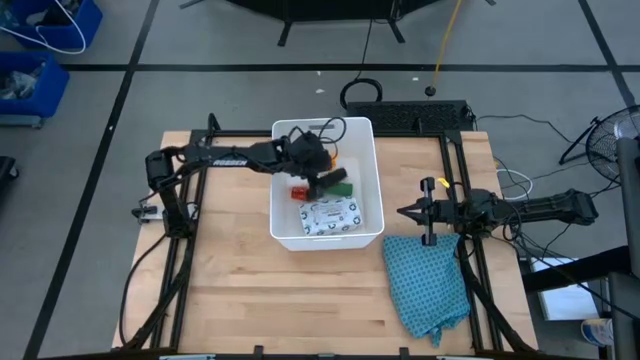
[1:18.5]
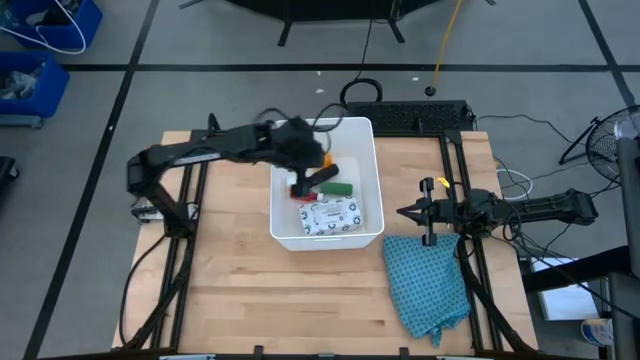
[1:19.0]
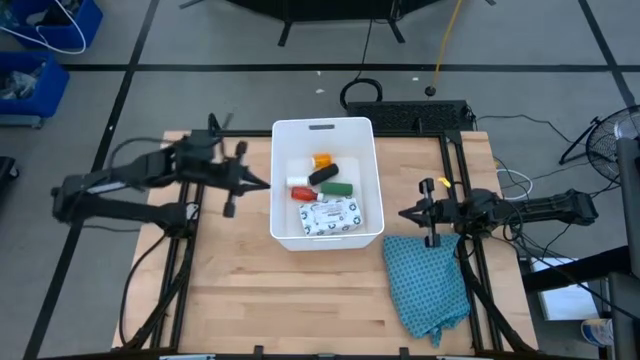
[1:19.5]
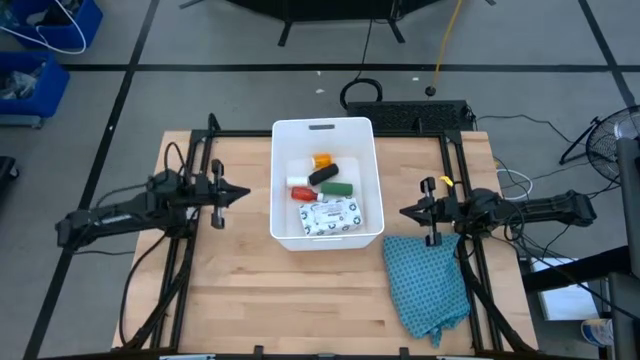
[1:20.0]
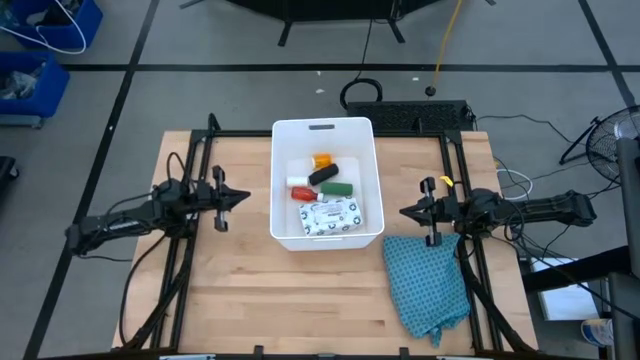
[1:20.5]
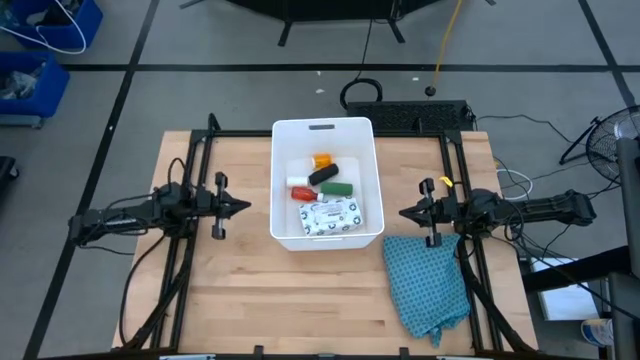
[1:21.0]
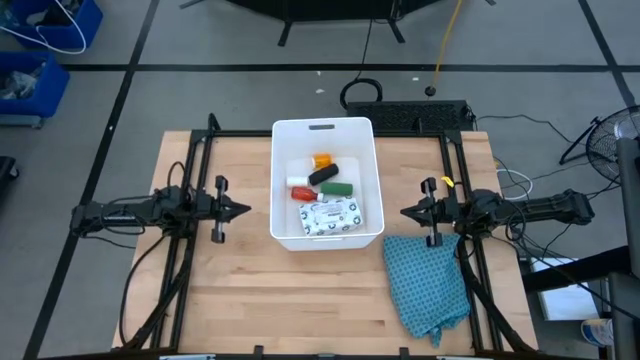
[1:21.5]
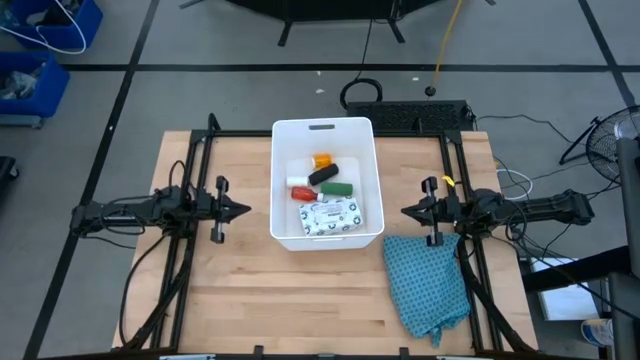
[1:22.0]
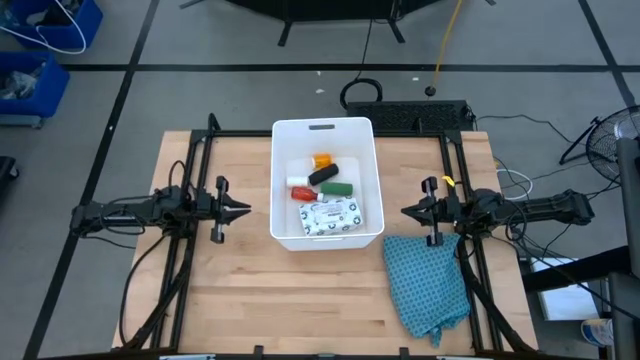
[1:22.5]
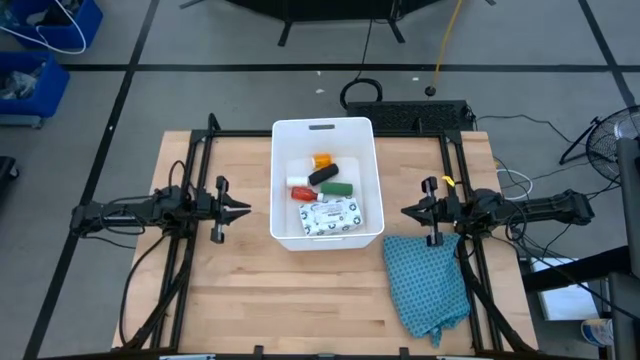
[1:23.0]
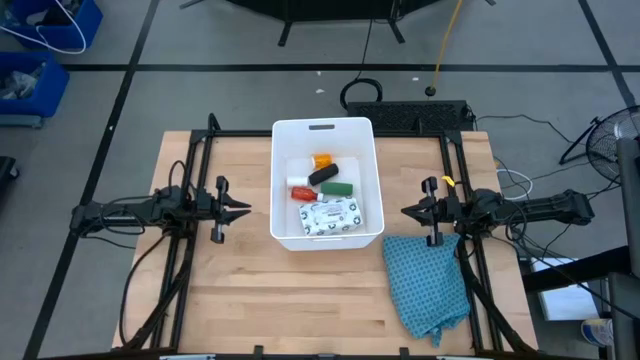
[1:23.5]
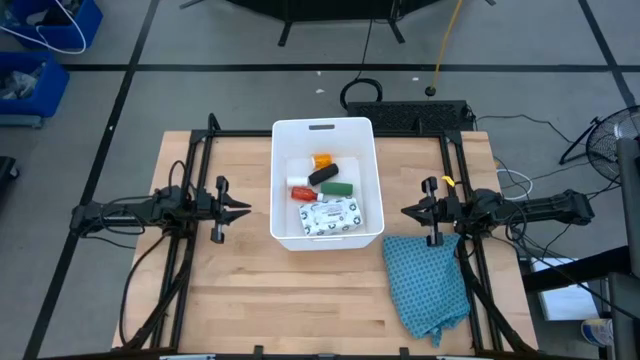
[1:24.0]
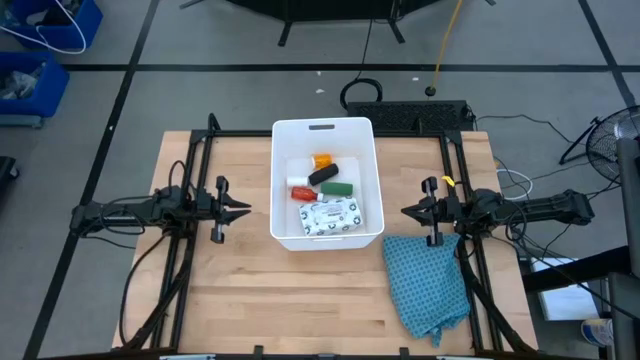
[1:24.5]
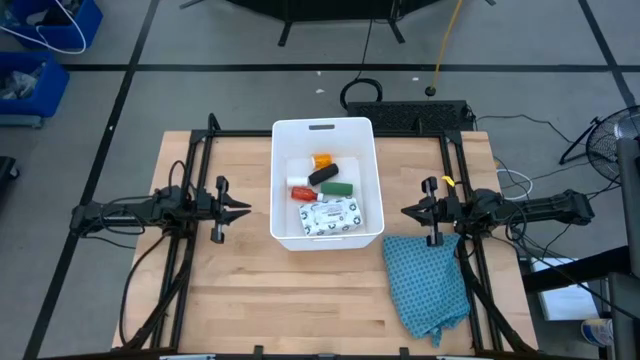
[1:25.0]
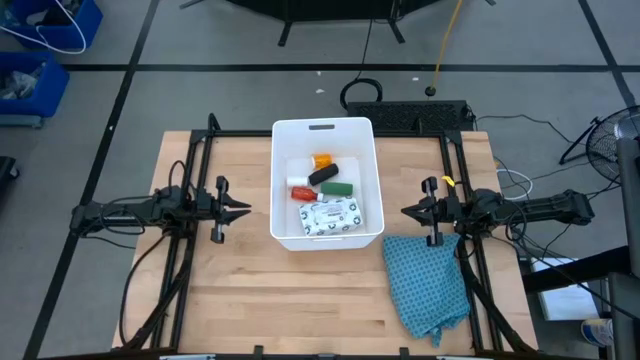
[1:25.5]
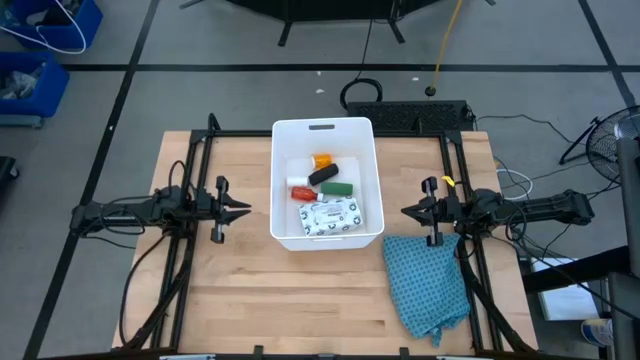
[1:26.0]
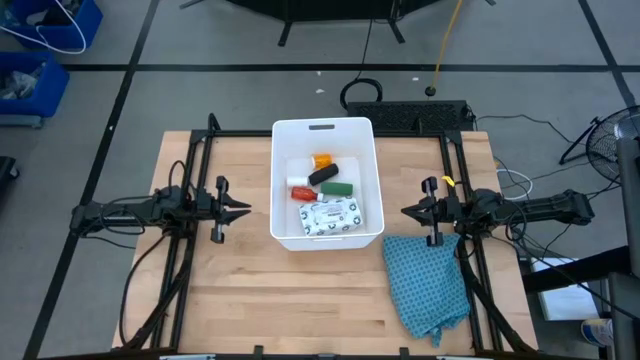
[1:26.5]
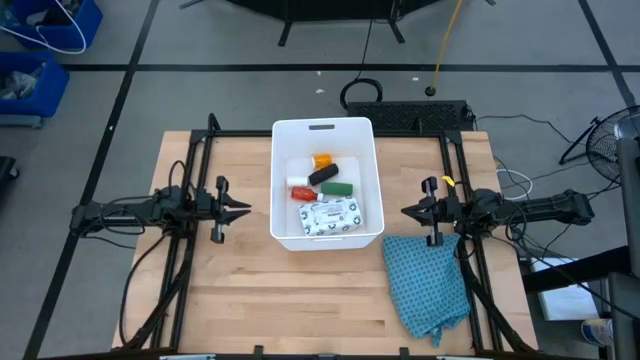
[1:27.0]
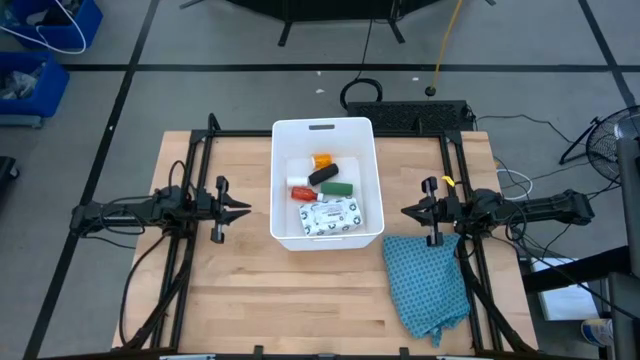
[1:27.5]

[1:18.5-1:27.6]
Task: Pick & place medical supplies in basket/bin
Return to Home Position

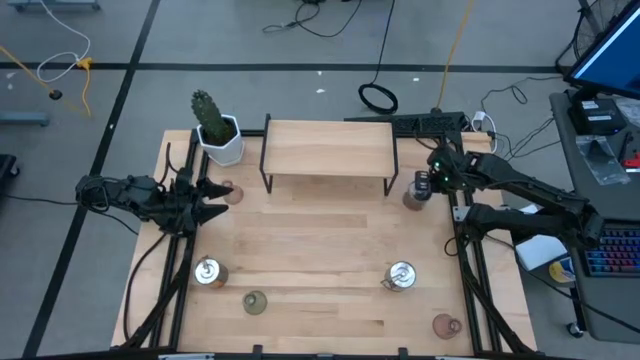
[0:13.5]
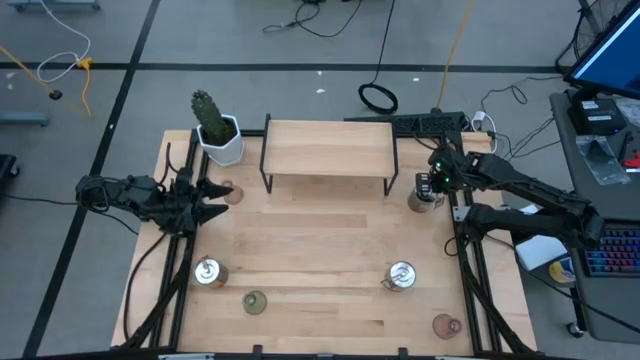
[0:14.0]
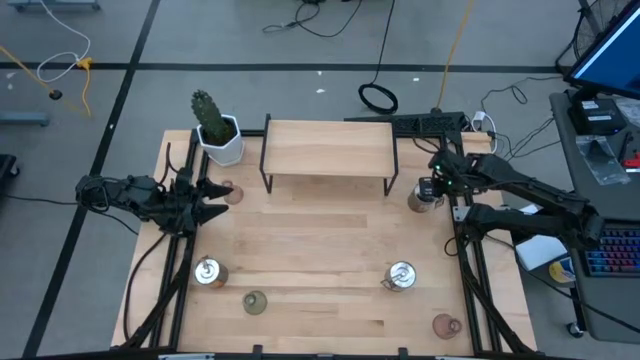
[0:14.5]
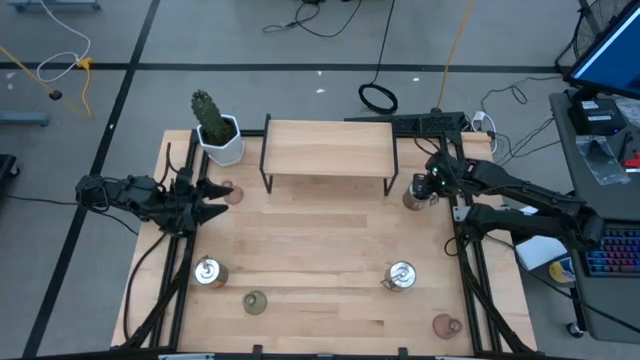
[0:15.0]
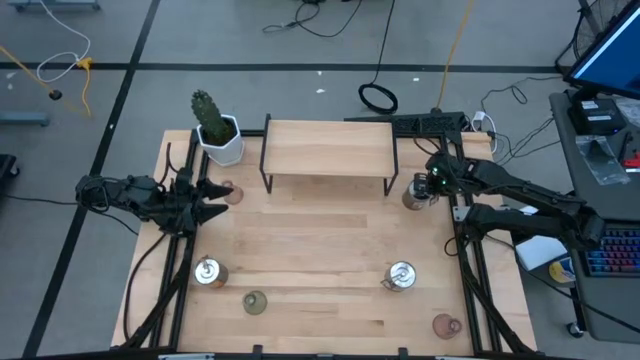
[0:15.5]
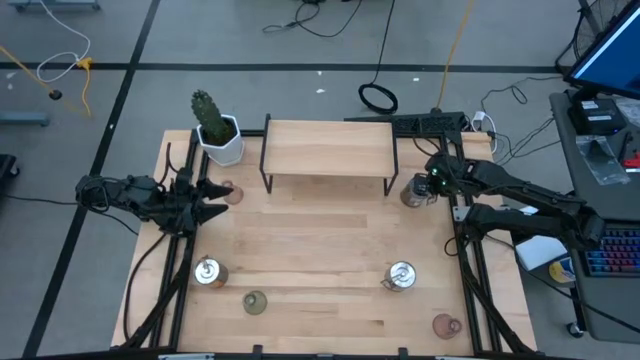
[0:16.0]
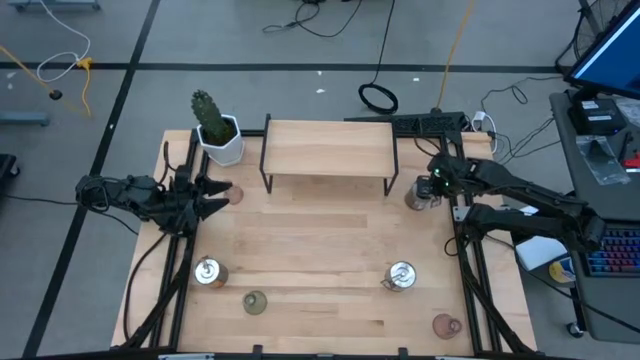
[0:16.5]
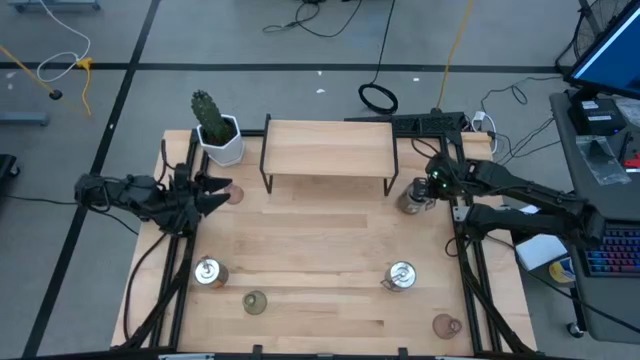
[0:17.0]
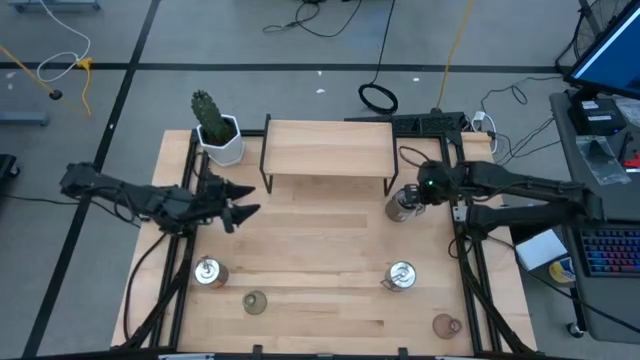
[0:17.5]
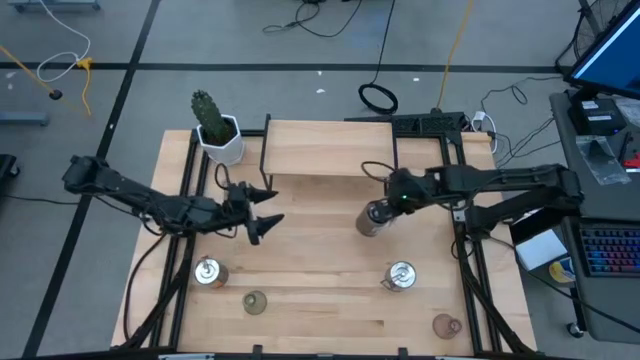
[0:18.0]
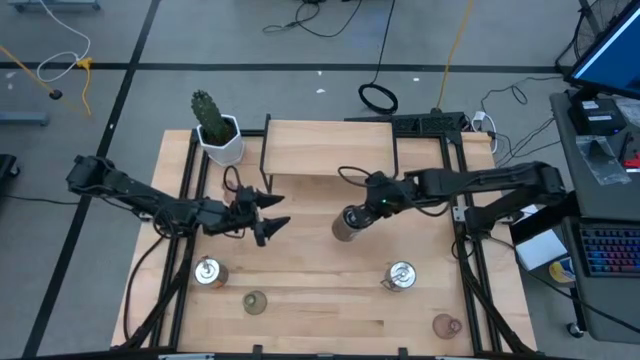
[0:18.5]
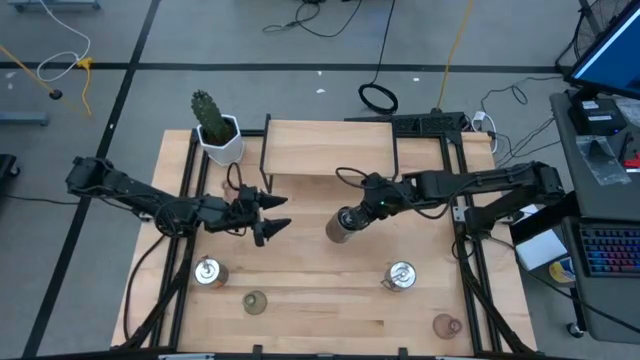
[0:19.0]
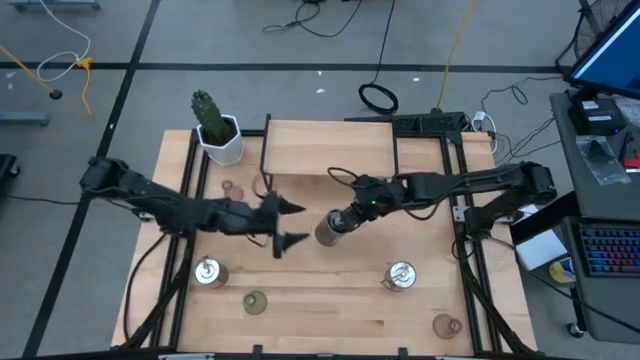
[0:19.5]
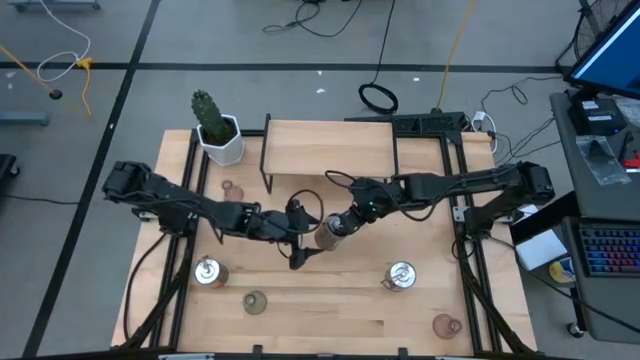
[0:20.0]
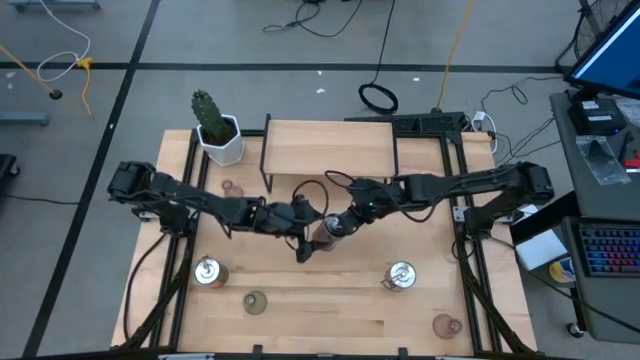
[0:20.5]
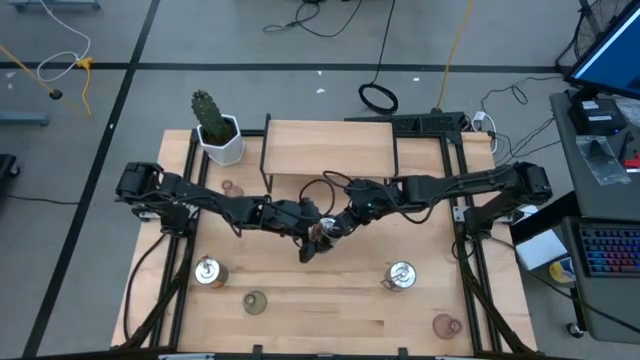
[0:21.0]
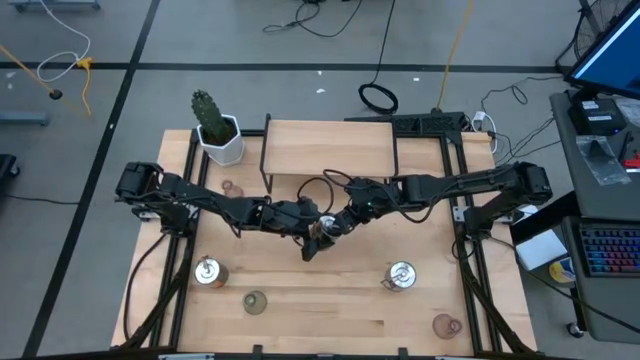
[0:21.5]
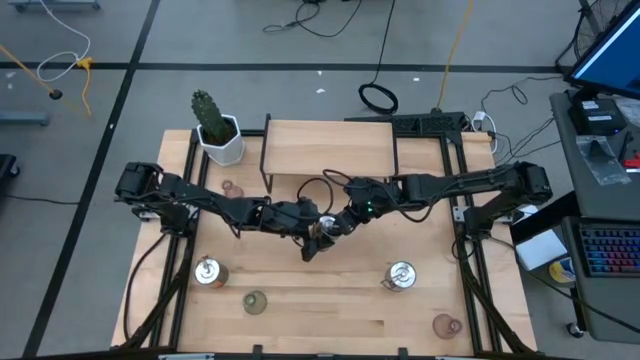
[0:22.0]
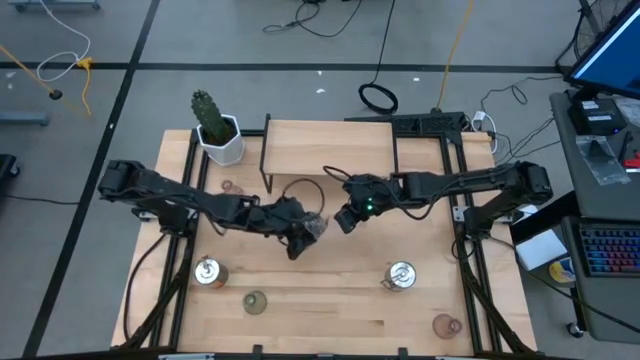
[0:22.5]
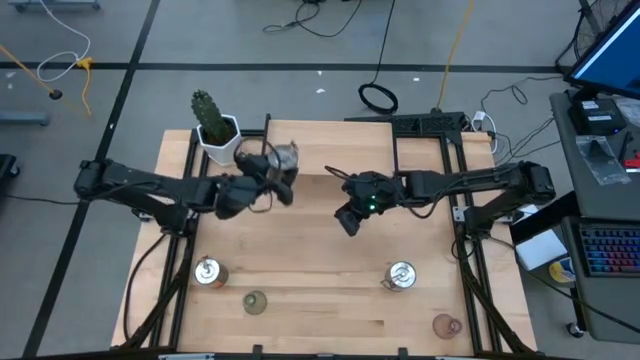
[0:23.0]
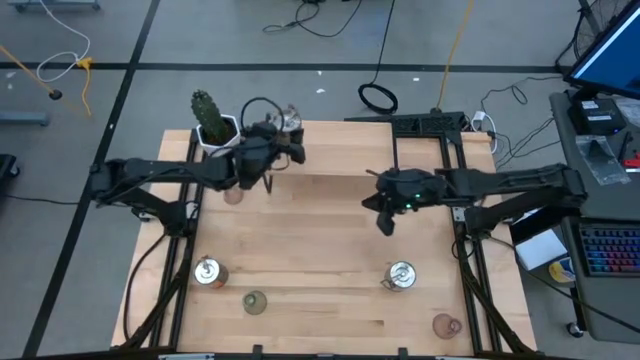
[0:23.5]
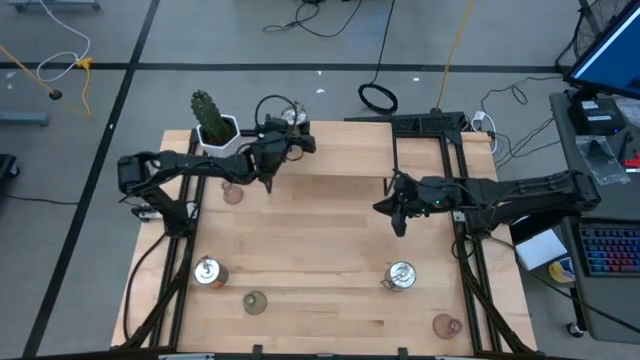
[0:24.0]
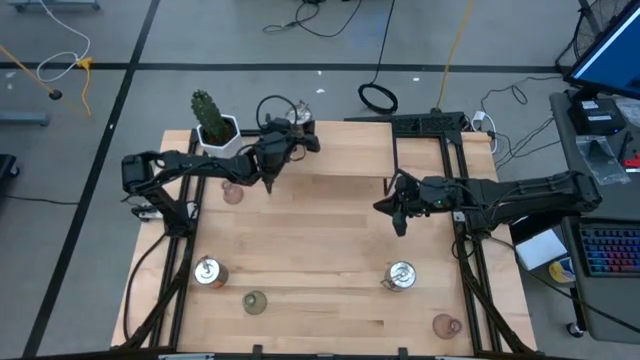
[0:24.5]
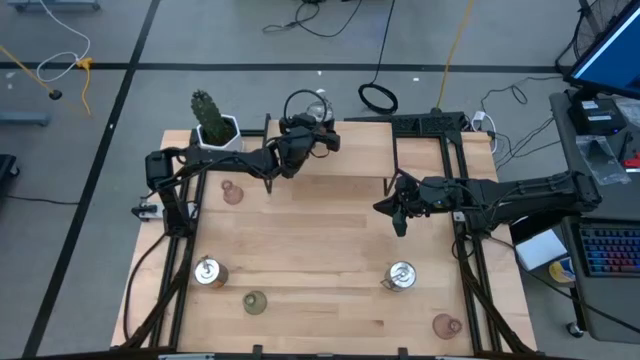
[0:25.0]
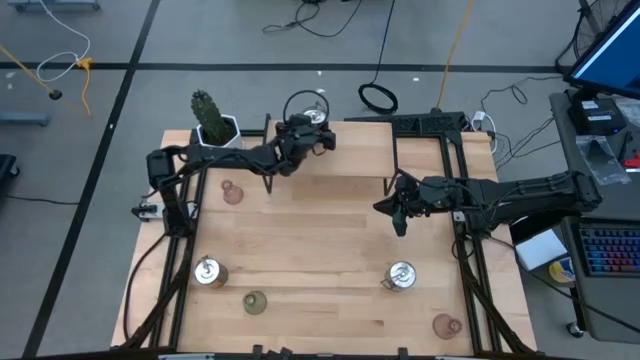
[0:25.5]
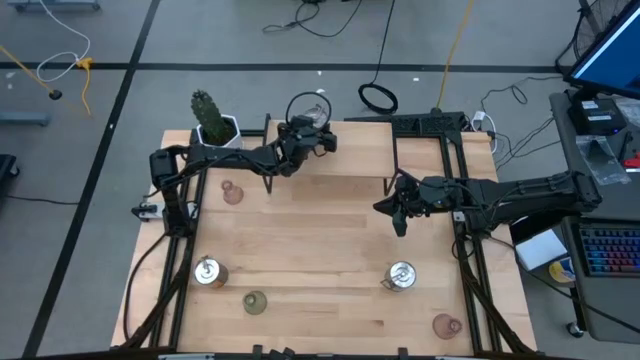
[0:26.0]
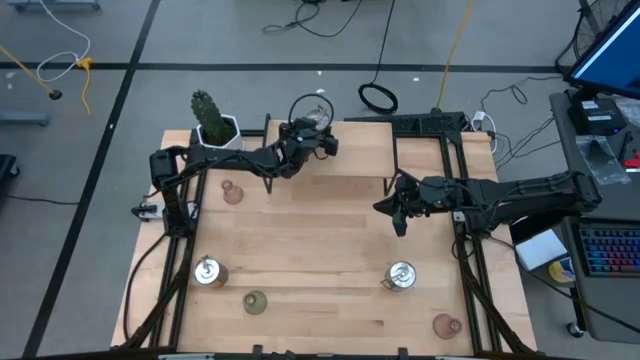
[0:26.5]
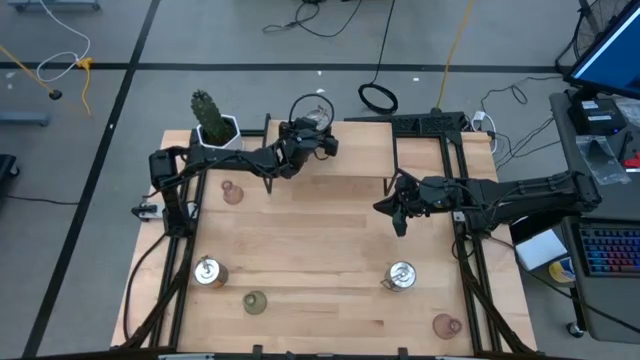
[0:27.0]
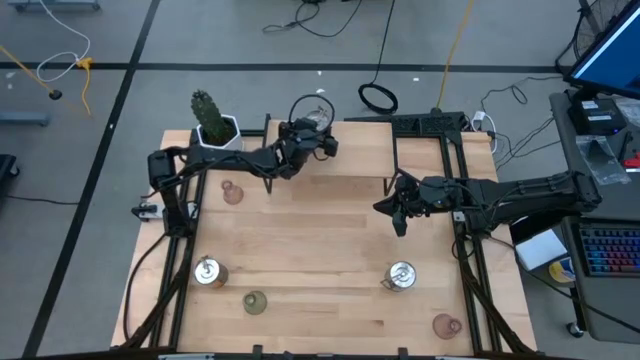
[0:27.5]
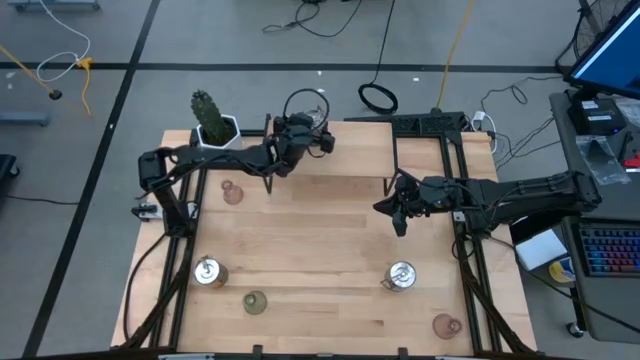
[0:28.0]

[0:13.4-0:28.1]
Task: Pick & Place candle stick holders
Put the top right silver scented candle on the shelf
